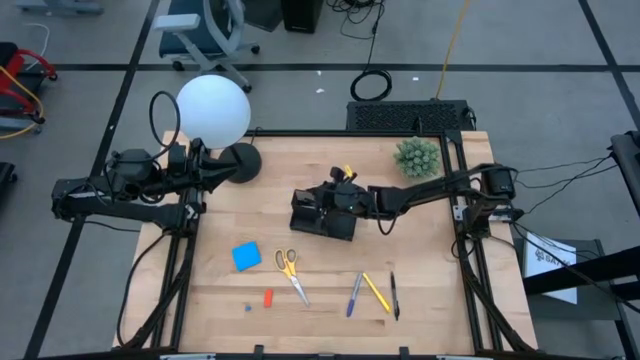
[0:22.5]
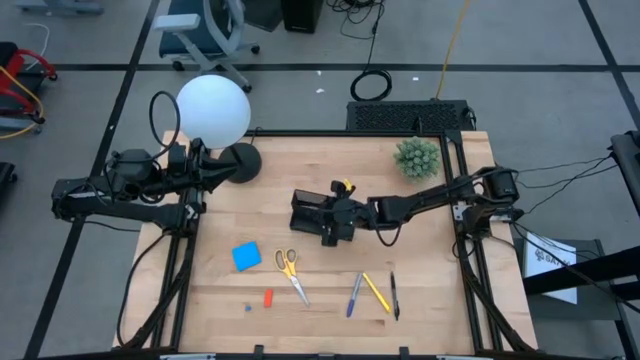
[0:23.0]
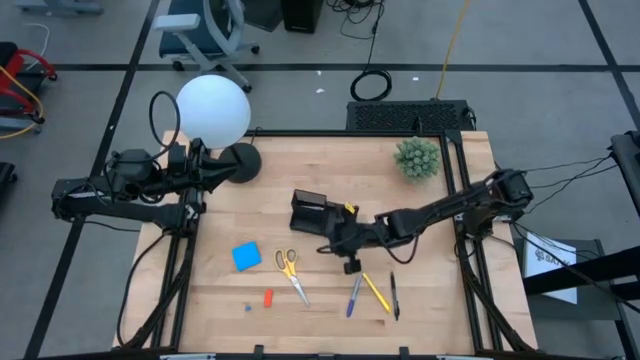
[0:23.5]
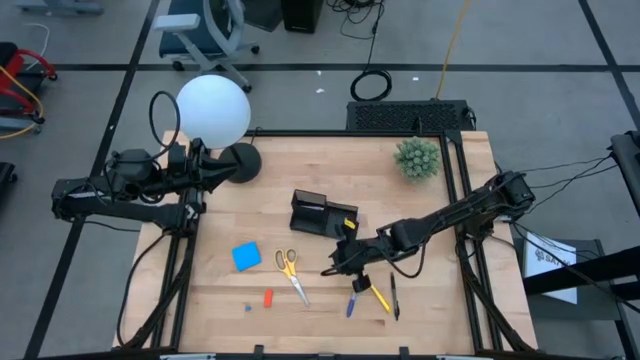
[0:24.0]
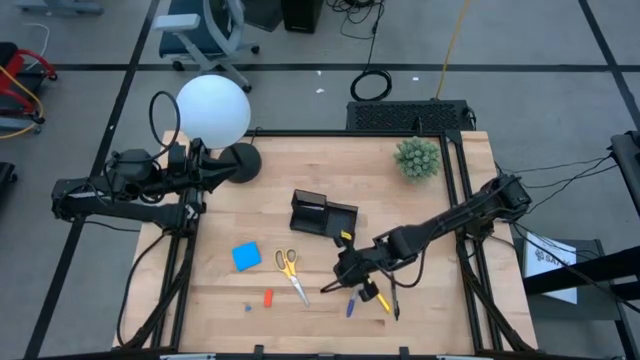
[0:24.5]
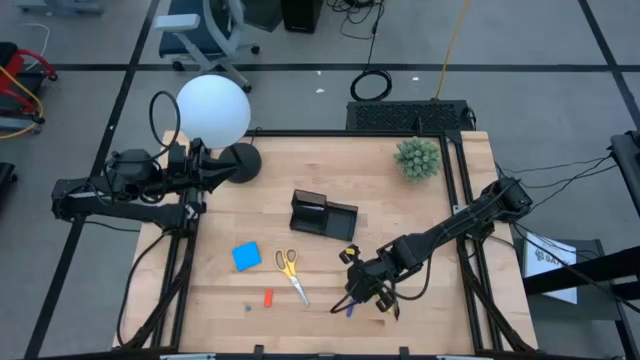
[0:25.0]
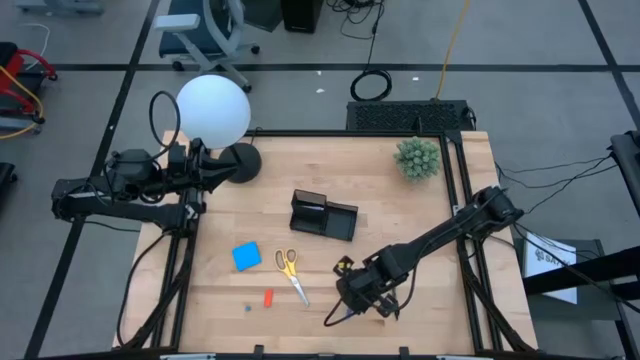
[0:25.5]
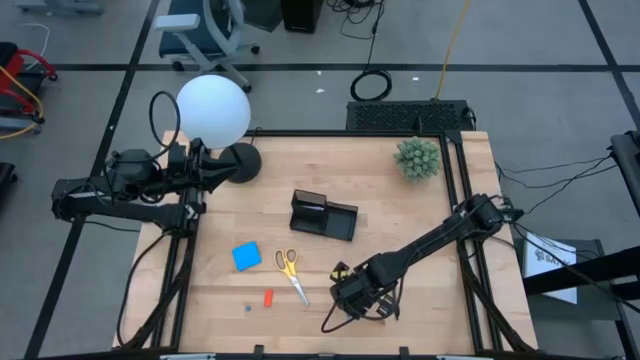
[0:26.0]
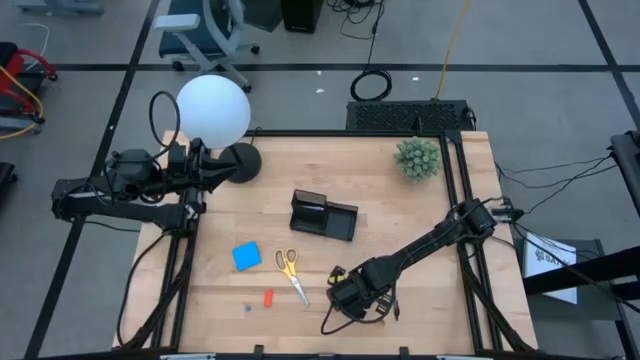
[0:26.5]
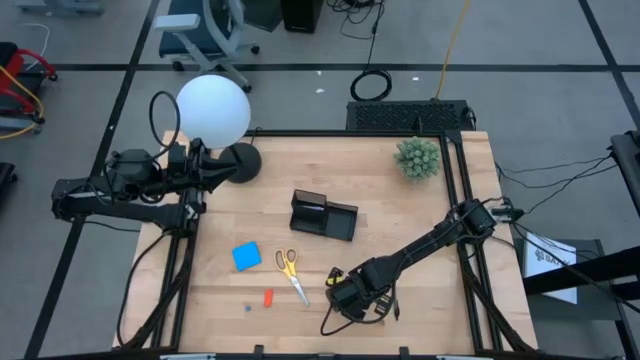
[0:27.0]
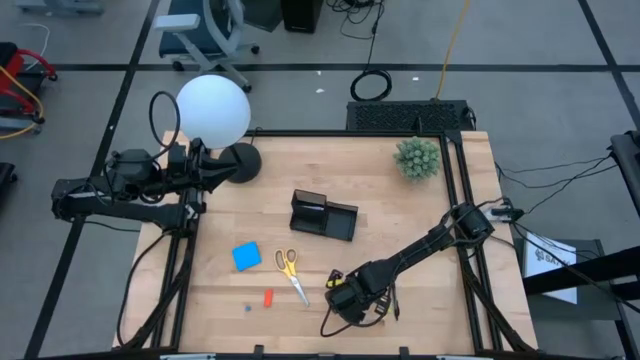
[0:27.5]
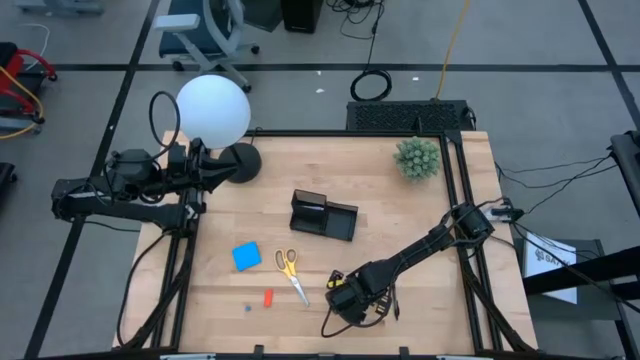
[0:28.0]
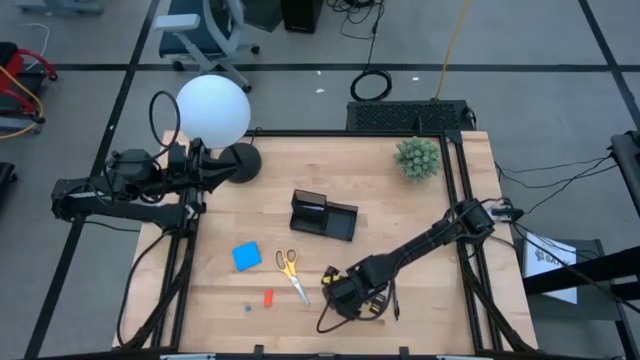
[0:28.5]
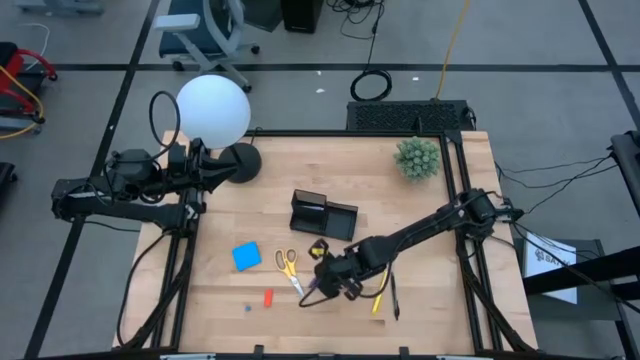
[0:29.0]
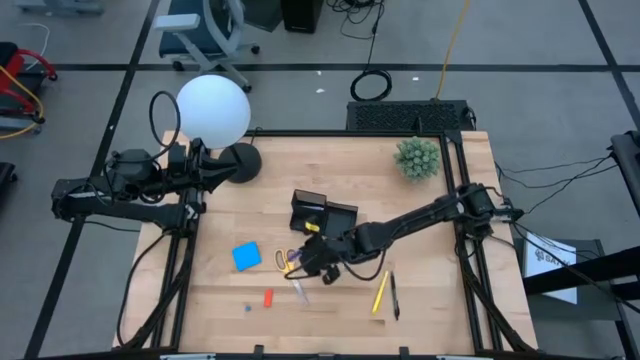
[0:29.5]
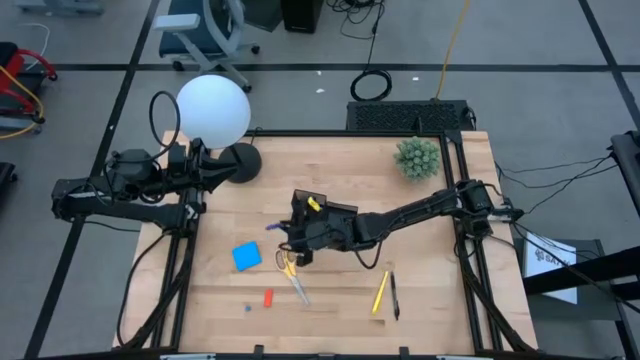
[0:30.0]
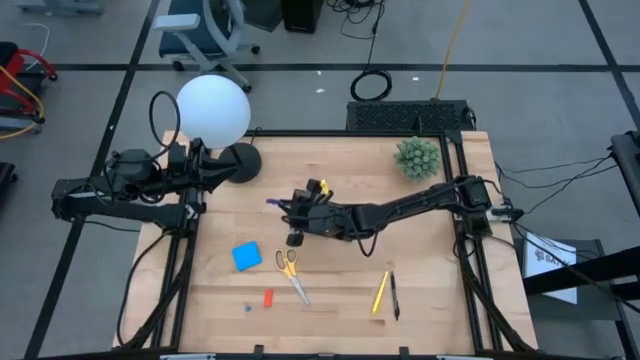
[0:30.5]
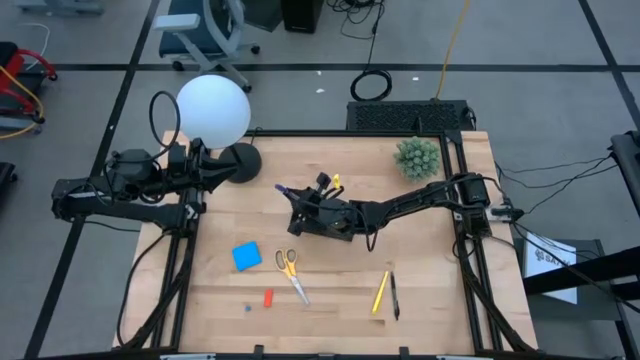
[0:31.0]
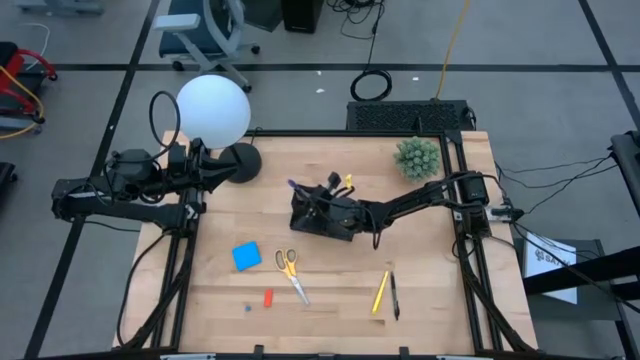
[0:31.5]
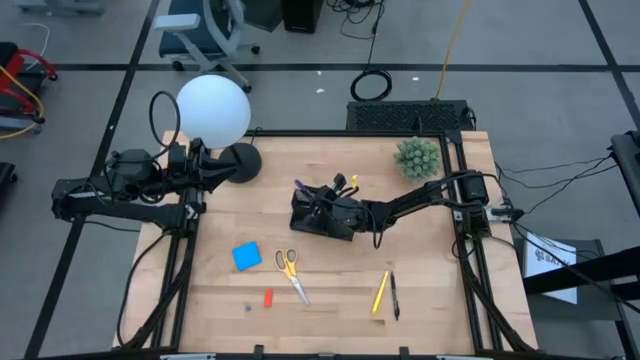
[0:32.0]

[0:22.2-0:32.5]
Task: Pick and place office supplies into organizer
Put the blue marker into the top left compartment of the black desk organizer

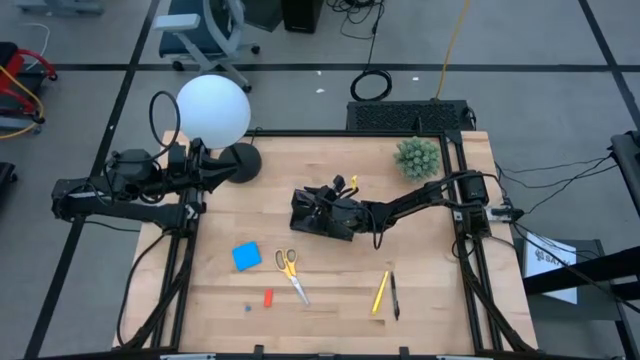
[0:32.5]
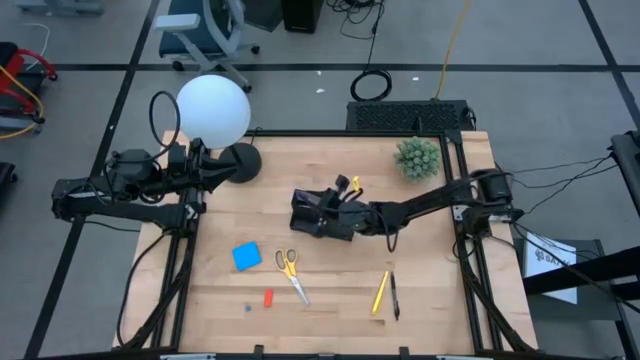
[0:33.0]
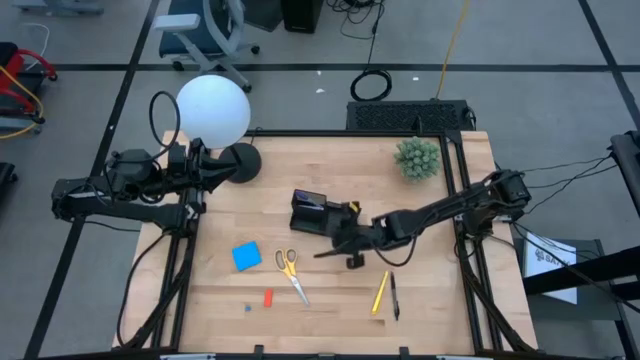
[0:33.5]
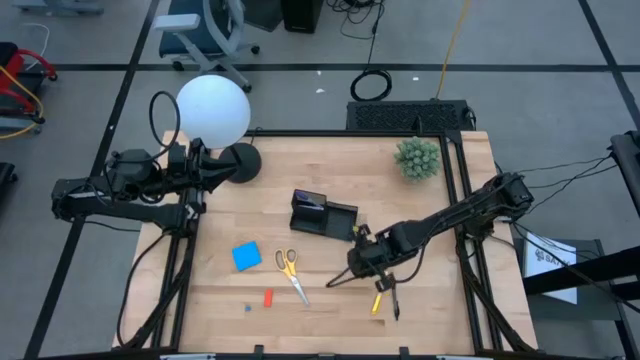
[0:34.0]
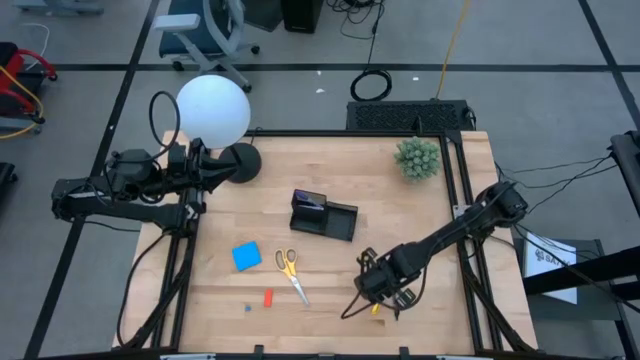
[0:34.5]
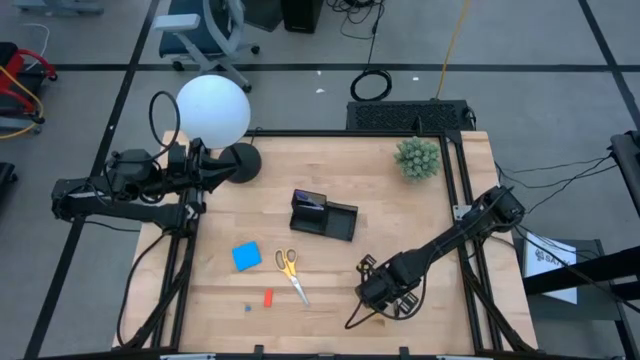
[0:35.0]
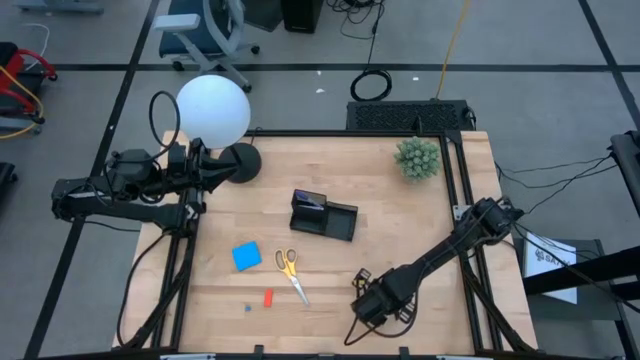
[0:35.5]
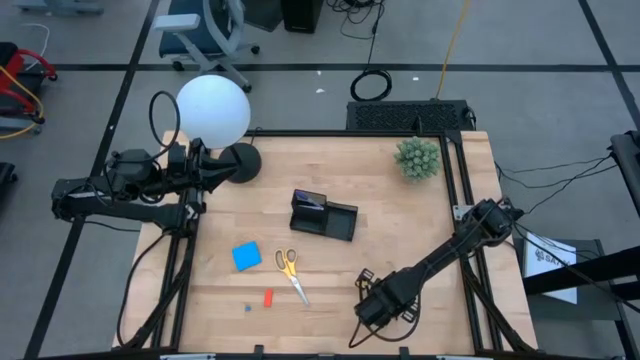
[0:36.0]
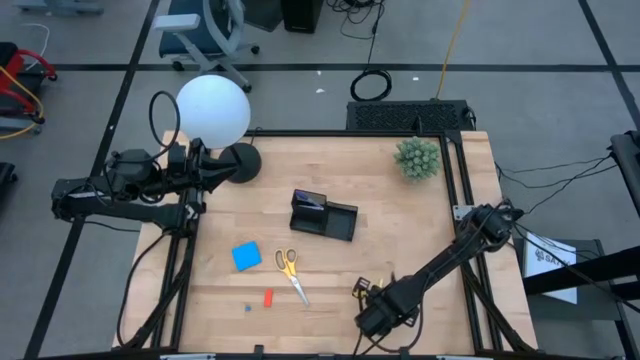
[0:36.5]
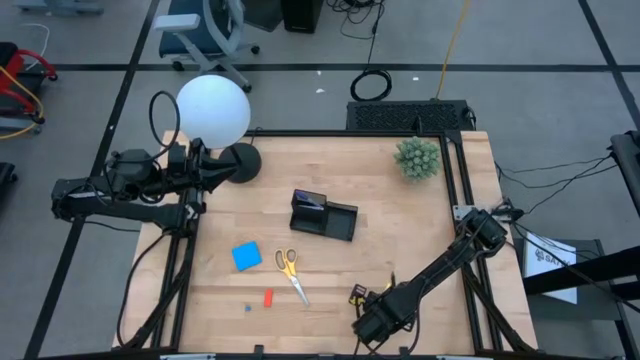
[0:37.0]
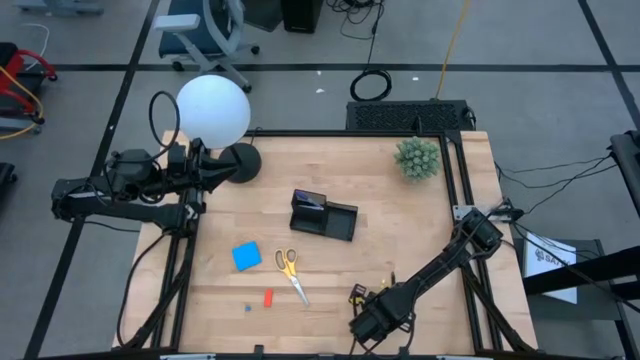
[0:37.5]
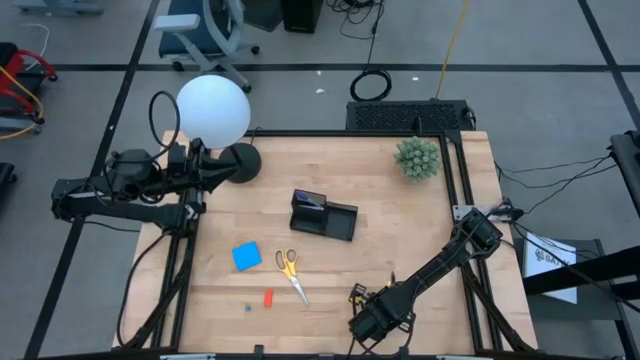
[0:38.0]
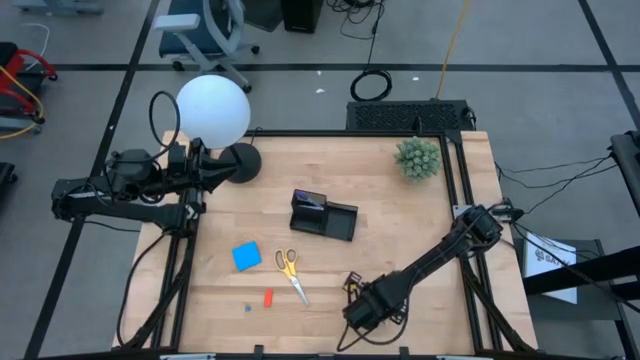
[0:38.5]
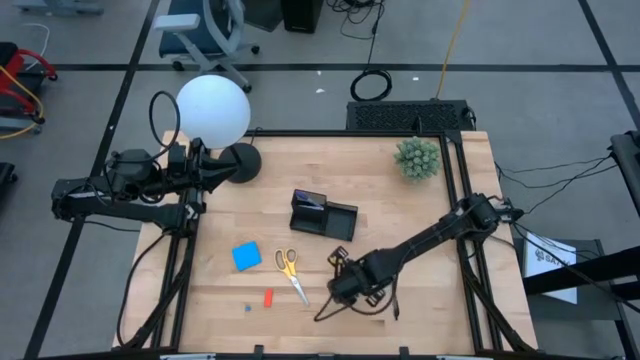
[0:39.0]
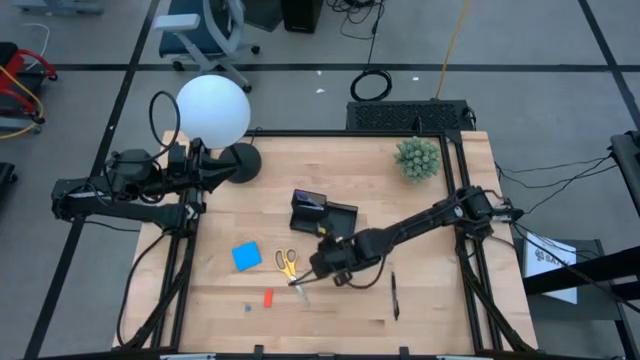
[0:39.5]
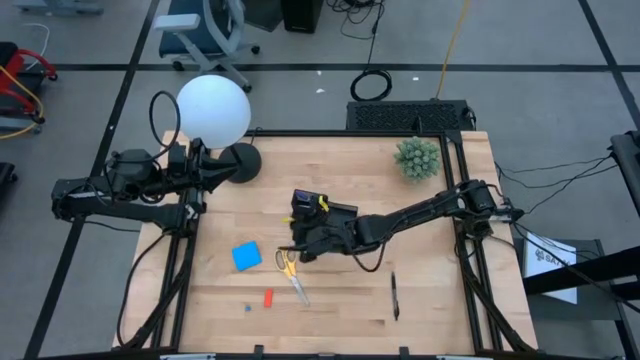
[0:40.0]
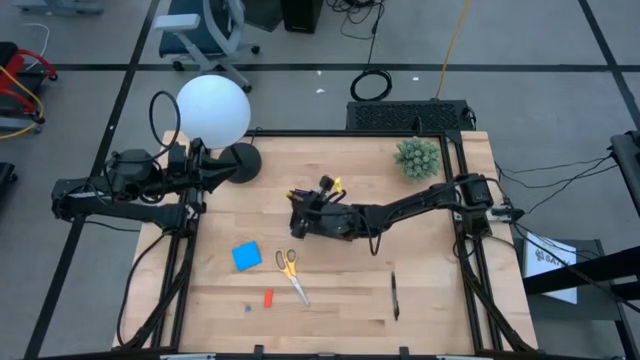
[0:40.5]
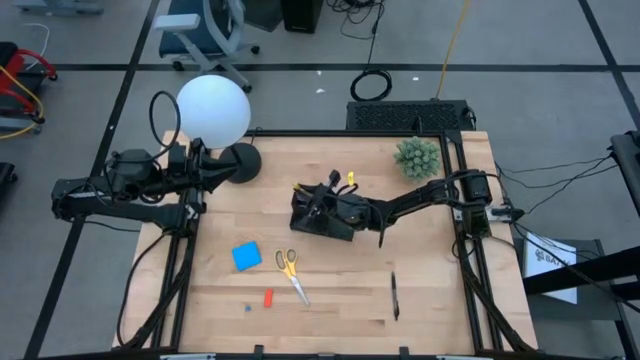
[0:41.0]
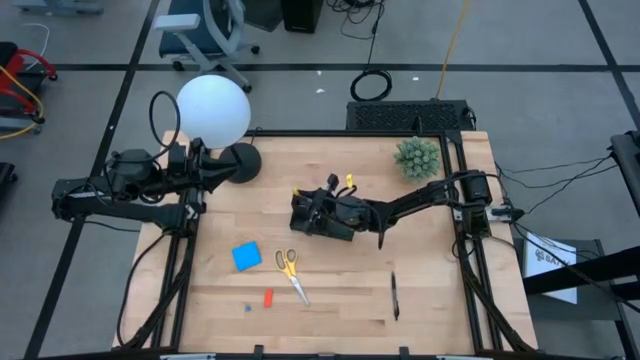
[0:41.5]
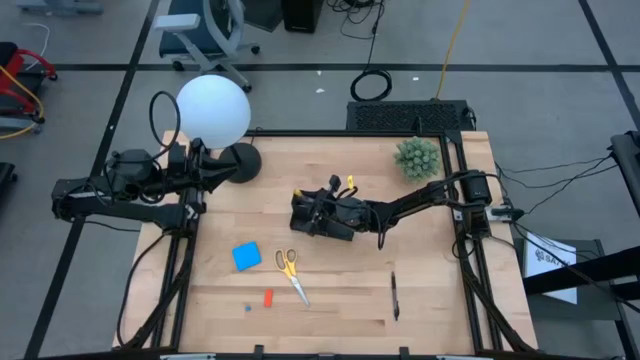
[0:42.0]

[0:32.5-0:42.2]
Put the yellow pen into the top left compartment of the black desk organizer

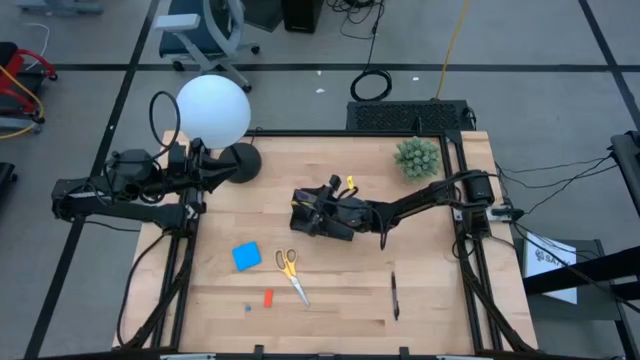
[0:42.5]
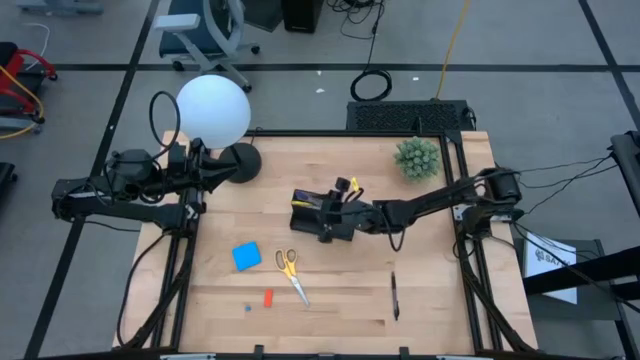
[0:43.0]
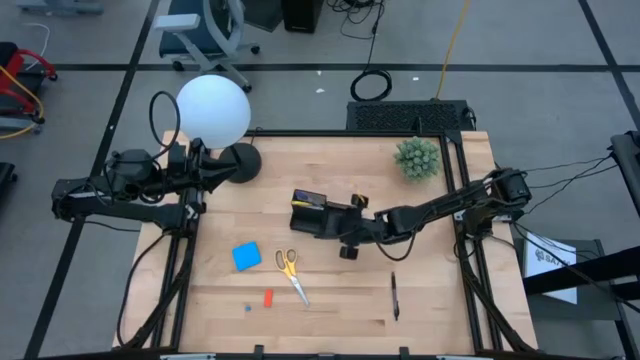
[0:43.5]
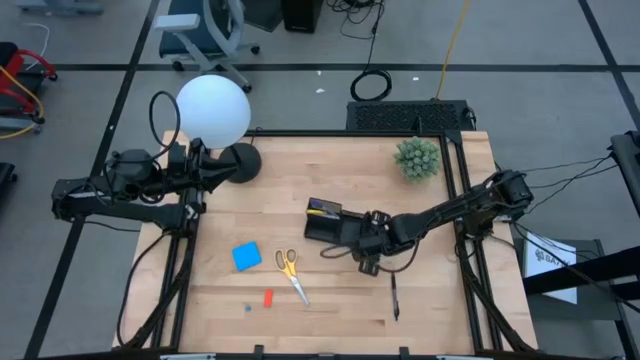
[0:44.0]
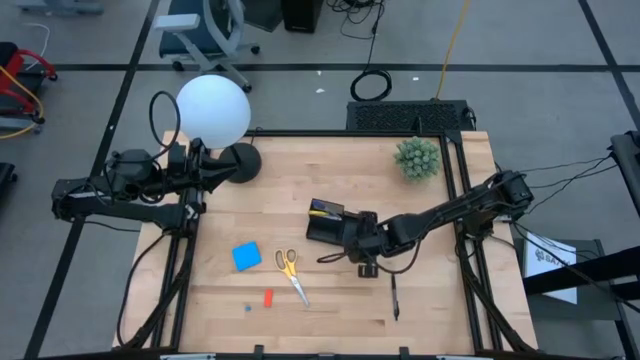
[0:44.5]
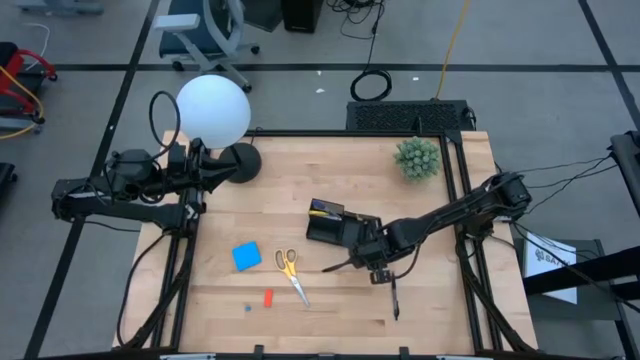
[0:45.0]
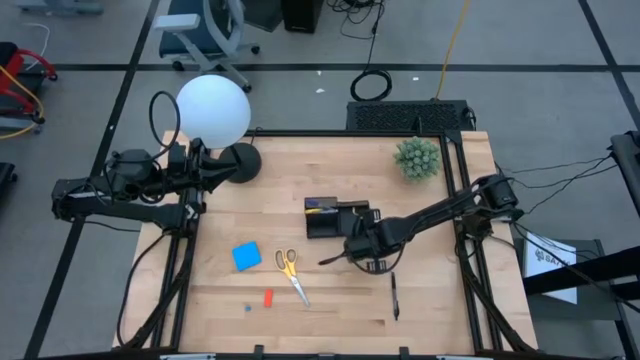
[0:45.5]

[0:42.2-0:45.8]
Adjust the black desk organizer on the table
